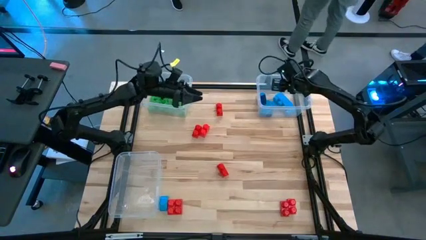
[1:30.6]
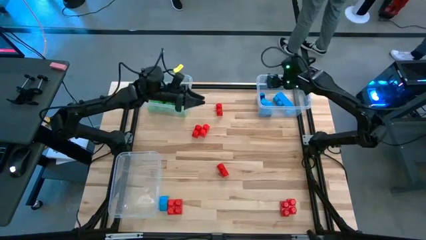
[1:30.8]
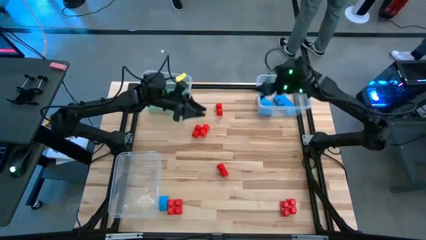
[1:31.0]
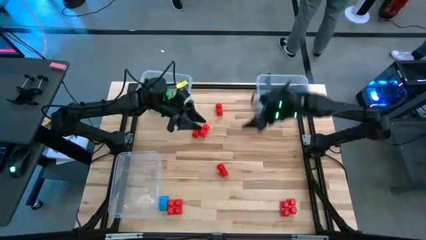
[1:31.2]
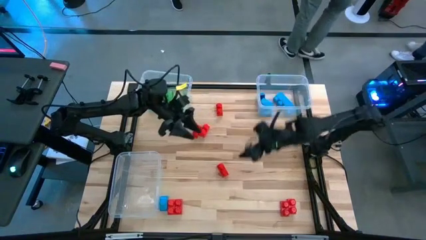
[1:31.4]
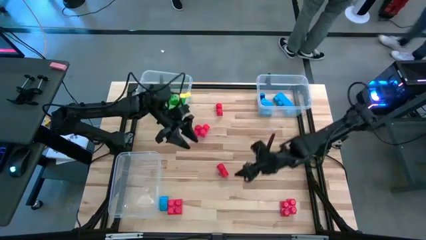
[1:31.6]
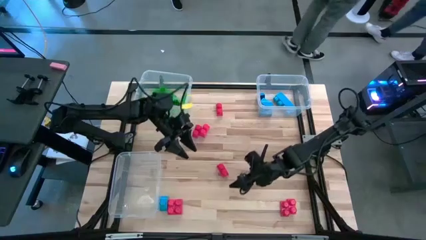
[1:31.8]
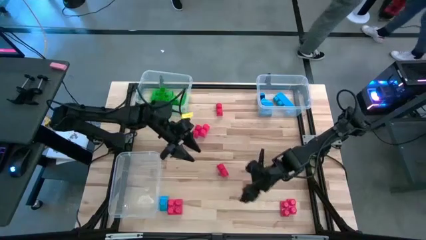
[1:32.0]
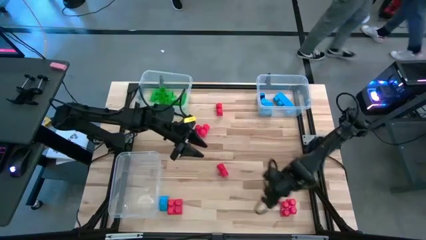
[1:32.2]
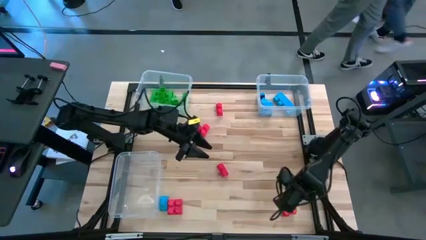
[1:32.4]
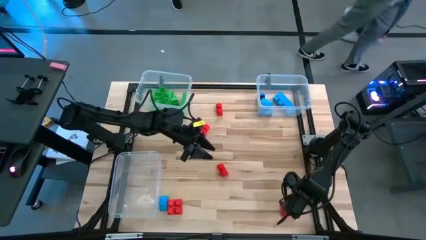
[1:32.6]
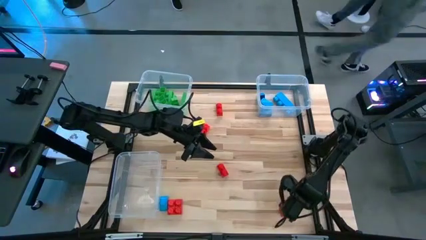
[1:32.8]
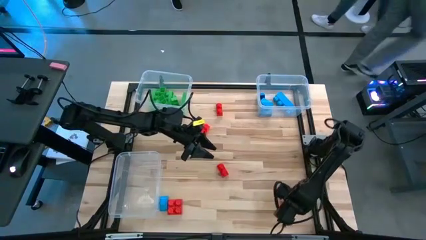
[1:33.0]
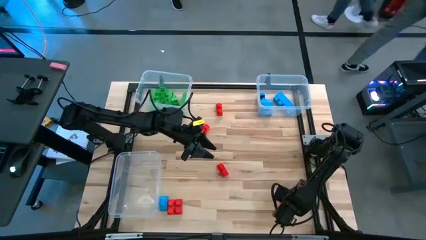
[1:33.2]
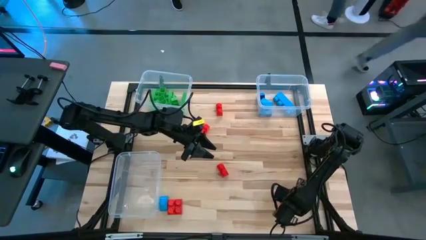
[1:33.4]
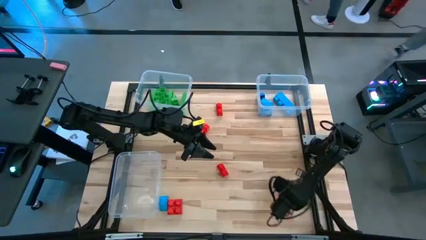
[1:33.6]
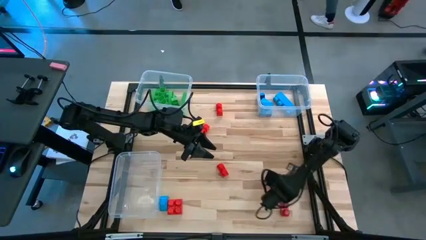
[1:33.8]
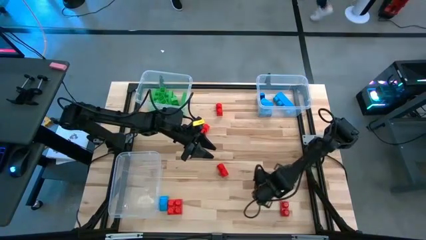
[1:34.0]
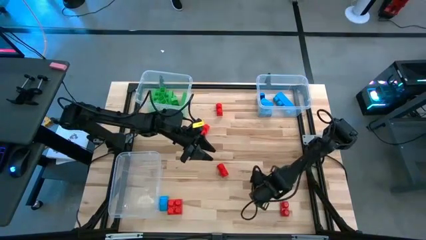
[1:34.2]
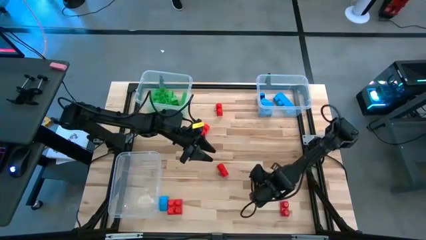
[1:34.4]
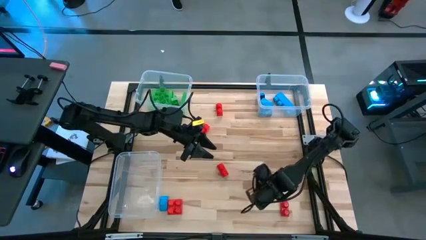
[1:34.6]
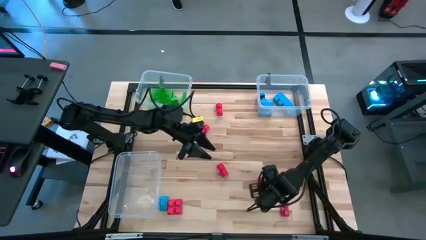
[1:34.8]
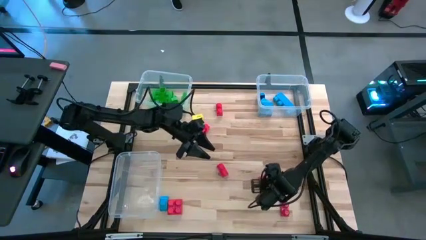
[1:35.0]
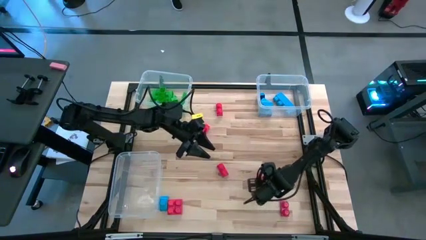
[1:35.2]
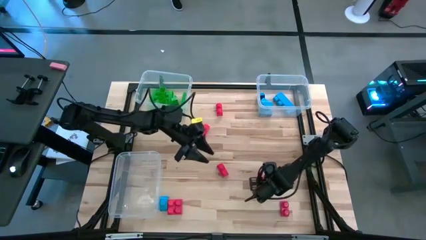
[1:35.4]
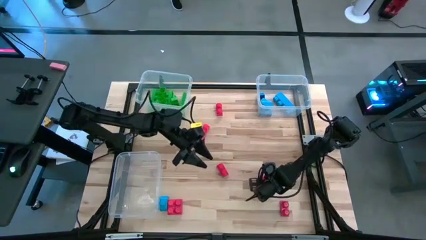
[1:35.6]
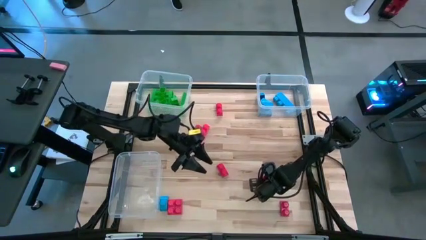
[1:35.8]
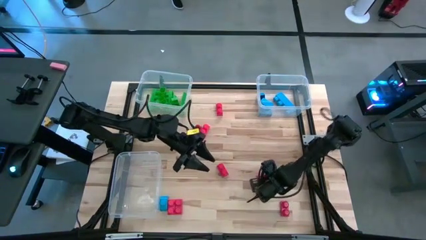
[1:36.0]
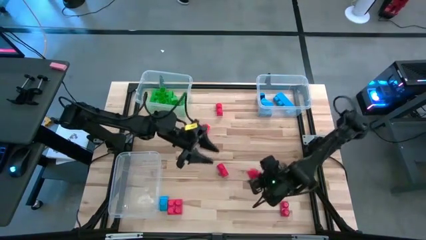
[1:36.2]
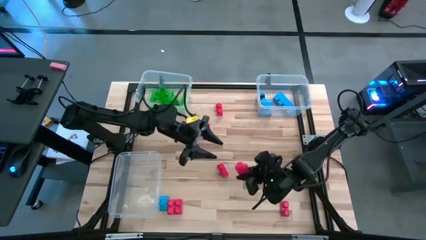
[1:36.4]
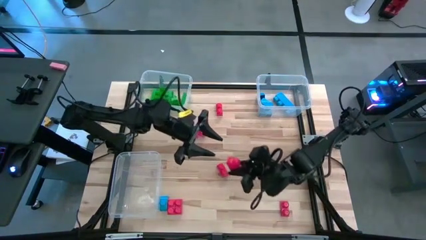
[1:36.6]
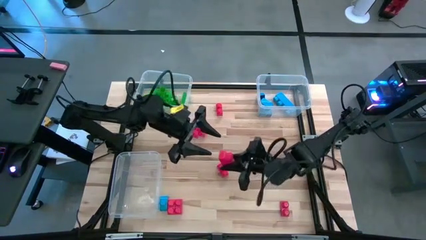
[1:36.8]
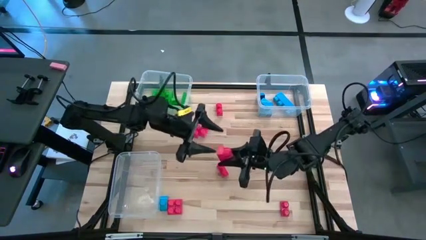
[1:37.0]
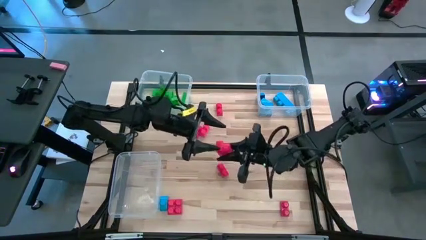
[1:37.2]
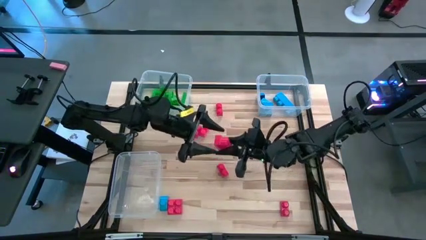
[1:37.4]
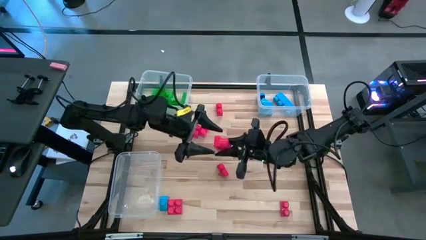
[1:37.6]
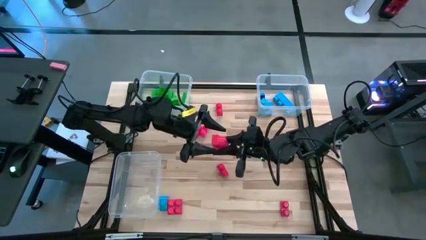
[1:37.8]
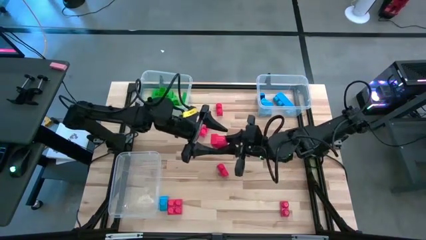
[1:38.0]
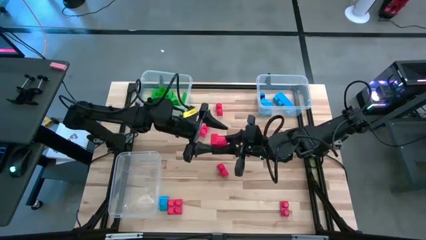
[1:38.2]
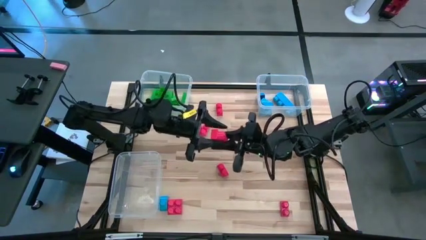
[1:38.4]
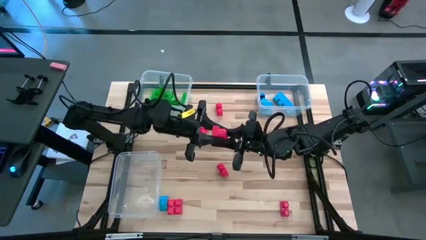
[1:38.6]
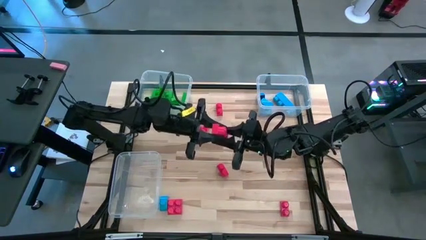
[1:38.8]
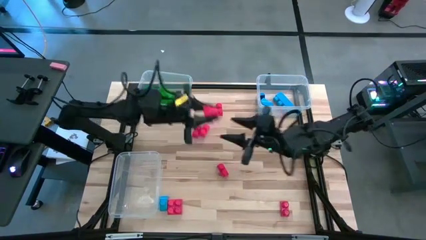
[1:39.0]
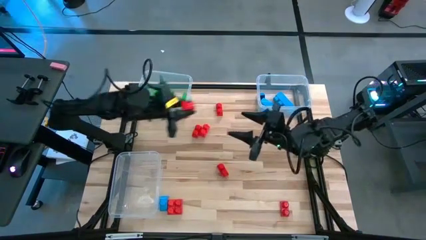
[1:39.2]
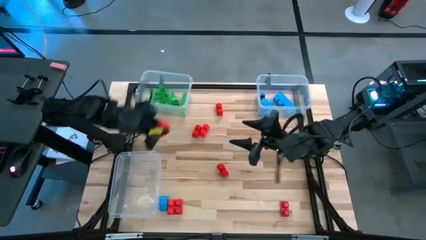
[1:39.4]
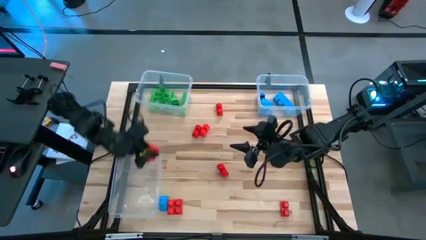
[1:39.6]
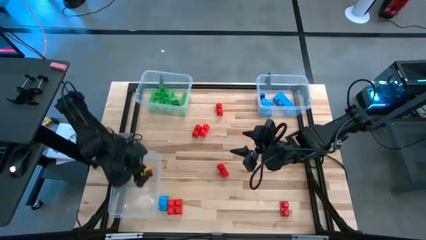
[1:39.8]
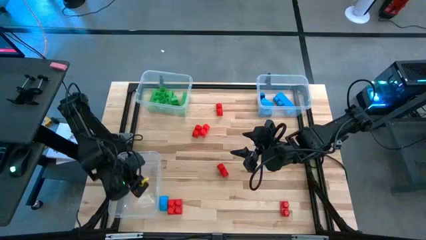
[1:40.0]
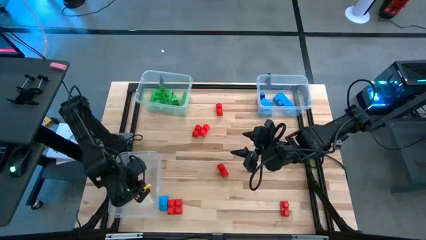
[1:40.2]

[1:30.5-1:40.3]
Task: Sort blocks
Put the red game piece into the bottom transparent bin

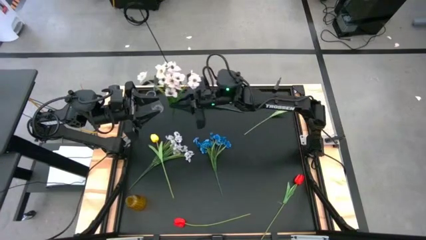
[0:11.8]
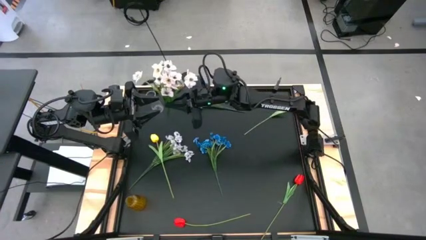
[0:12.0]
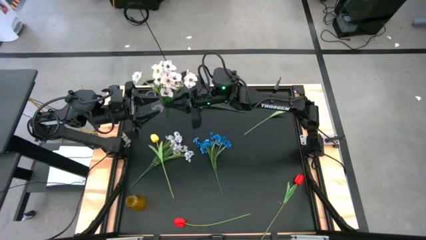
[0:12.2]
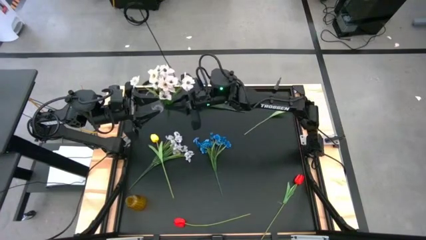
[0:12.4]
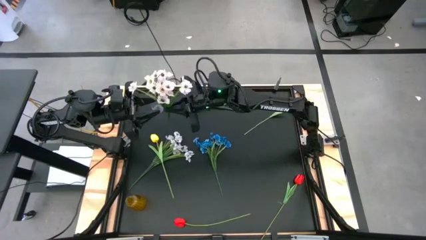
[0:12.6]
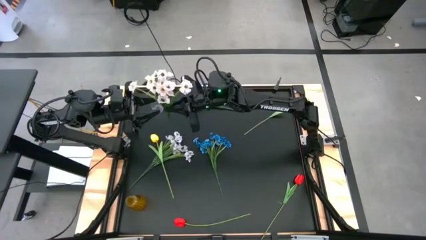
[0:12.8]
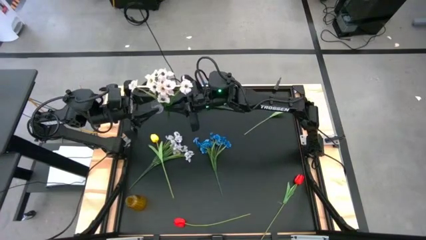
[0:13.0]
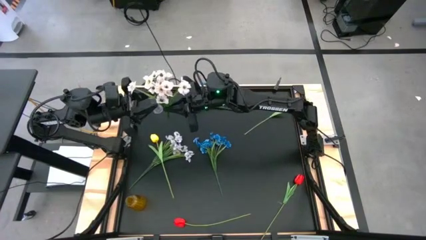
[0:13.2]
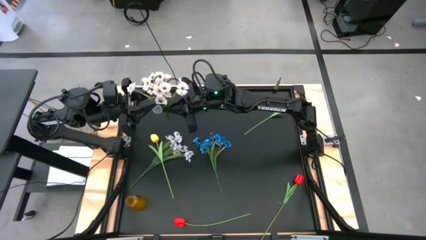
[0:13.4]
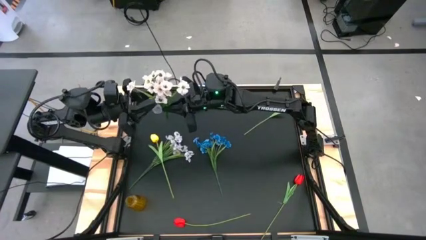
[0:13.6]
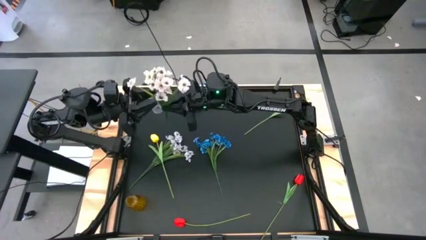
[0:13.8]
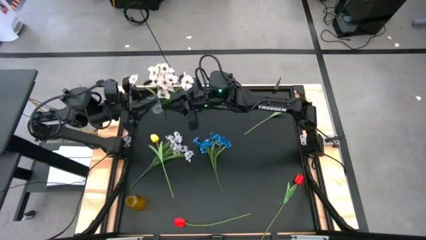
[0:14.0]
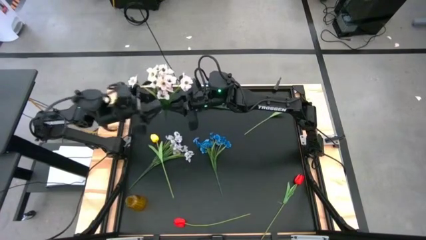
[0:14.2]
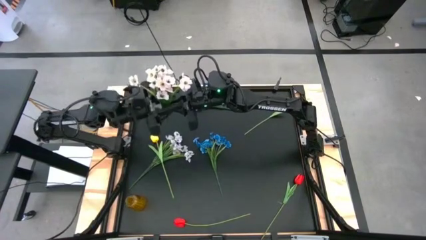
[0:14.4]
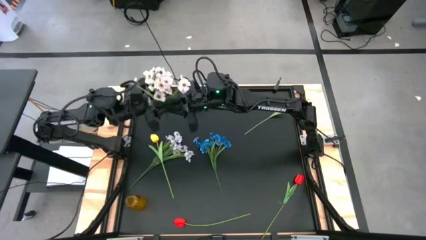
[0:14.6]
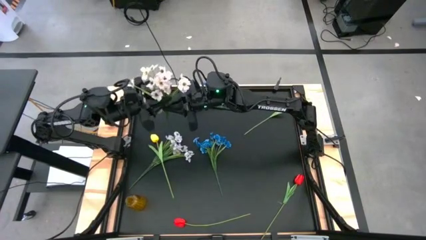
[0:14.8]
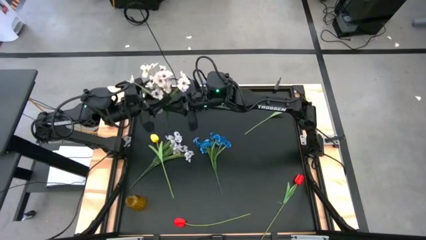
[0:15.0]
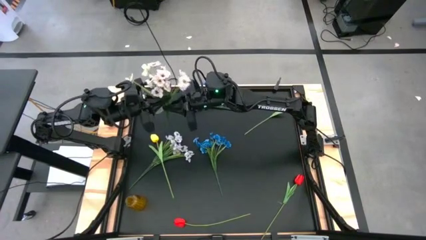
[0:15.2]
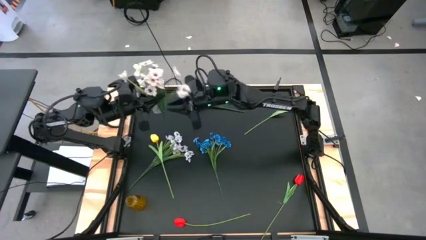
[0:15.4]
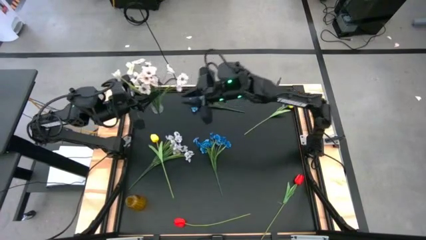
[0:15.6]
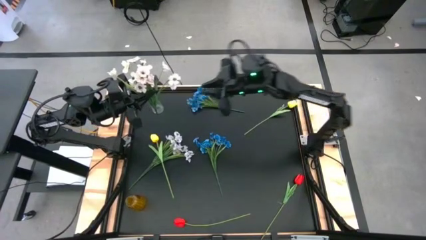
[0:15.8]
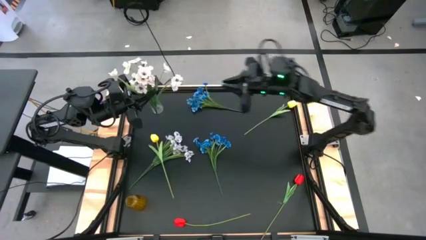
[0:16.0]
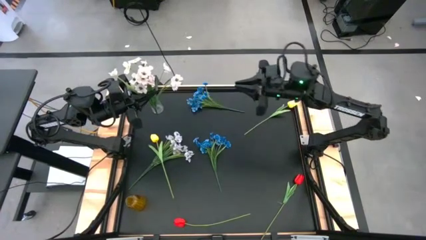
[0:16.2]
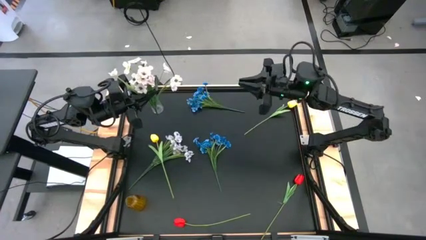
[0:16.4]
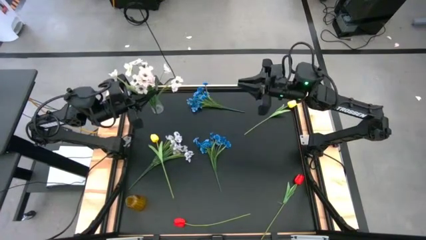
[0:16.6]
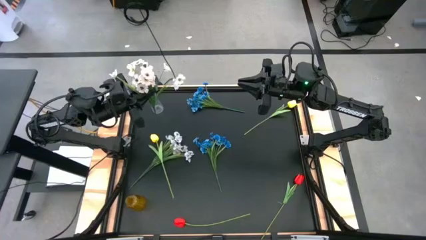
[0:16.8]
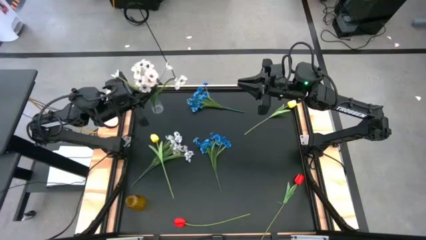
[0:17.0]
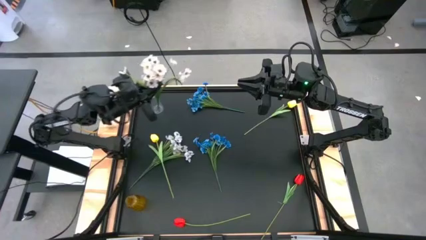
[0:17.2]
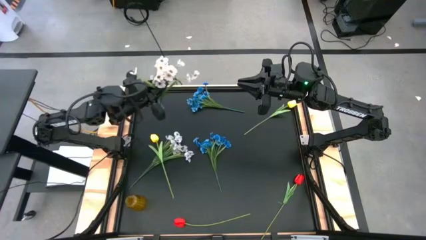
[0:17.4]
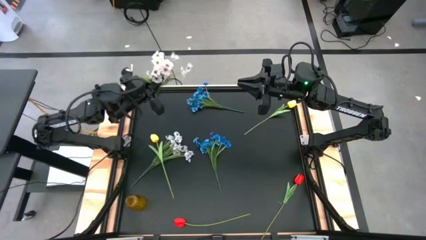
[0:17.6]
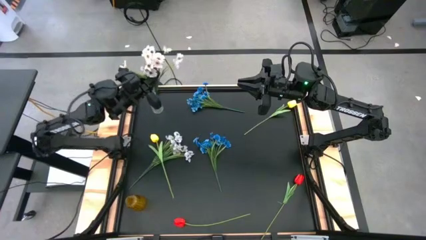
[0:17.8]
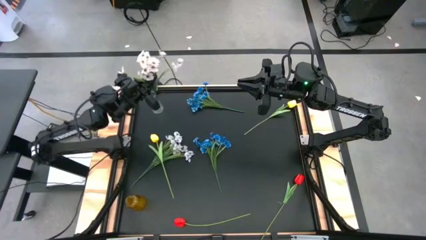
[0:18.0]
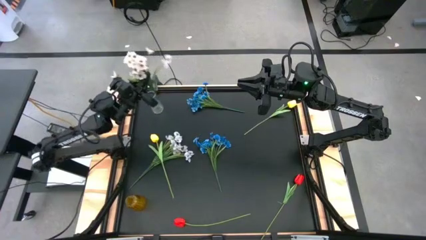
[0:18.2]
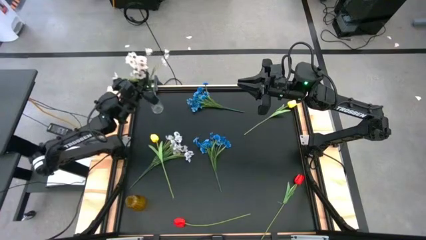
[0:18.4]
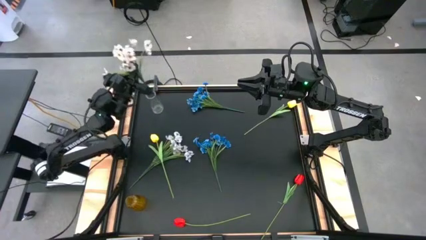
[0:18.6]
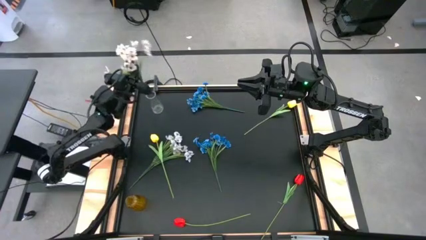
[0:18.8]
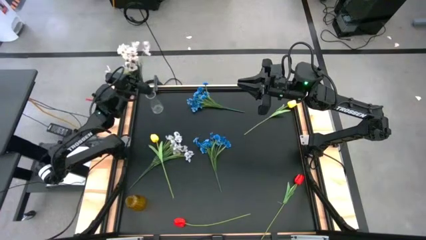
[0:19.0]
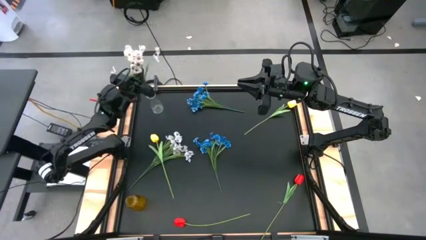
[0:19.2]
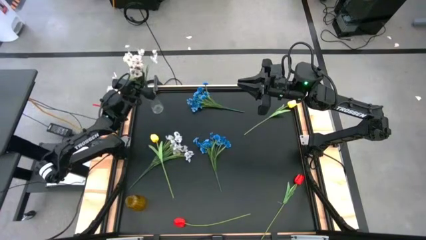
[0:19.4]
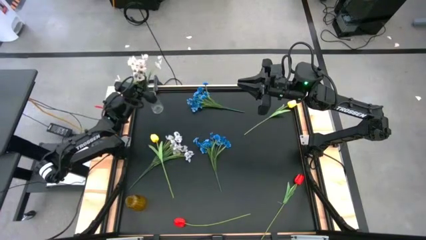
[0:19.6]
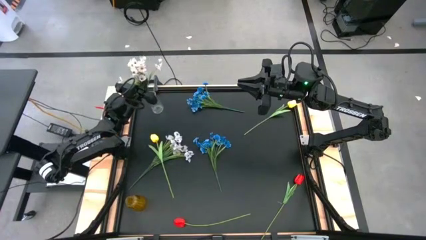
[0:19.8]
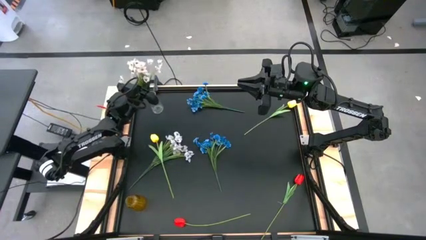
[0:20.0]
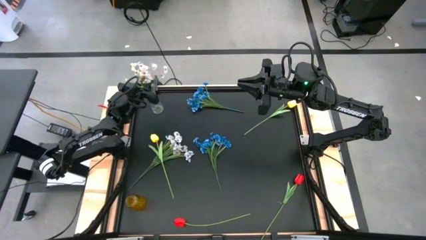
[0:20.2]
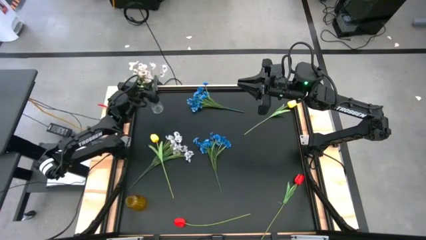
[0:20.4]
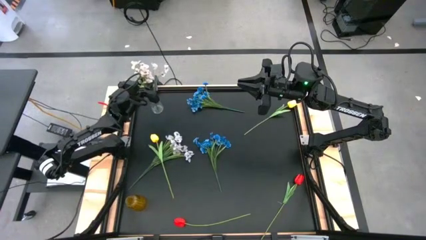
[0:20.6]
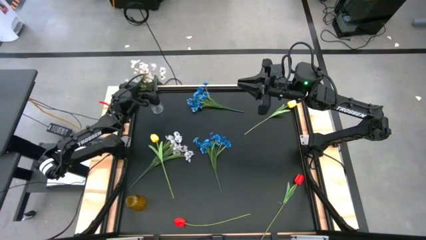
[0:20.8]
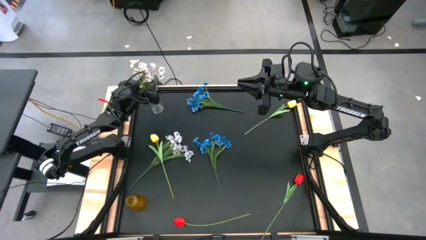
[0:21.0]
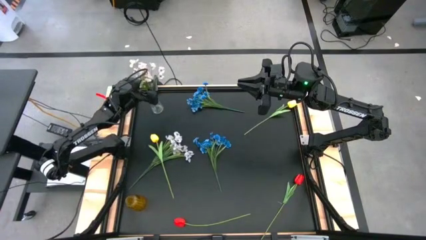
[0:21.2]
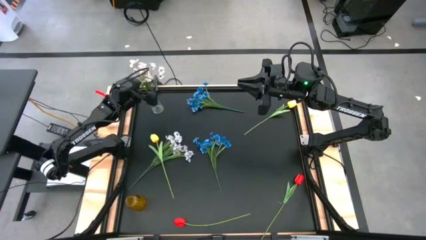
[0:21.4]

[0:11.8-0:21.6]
Task: Sort flowers into vase by color
Put the right white flowers into the transparent vase
